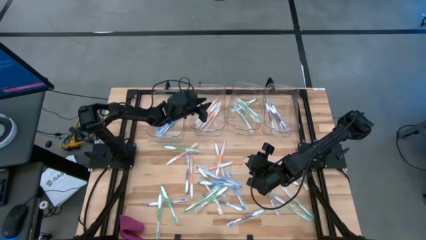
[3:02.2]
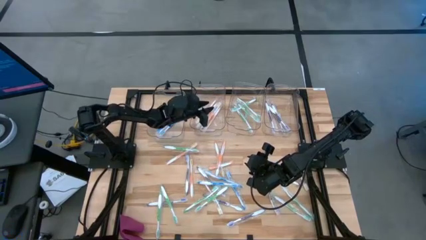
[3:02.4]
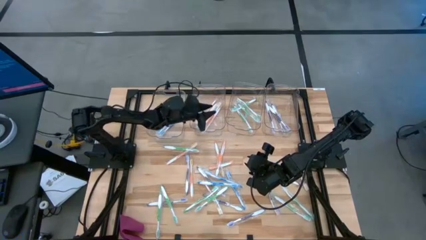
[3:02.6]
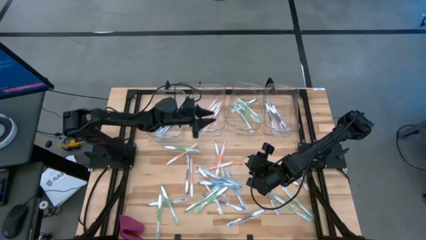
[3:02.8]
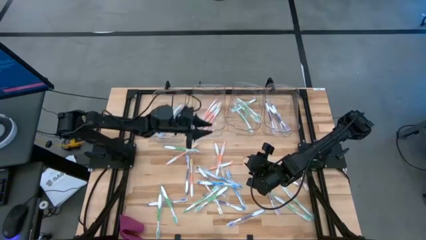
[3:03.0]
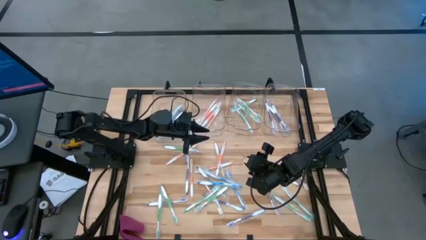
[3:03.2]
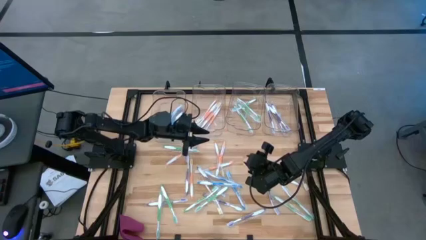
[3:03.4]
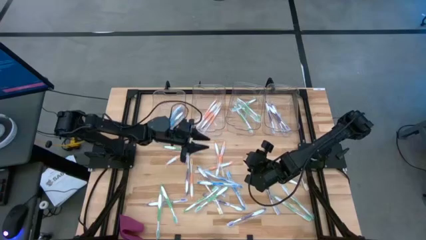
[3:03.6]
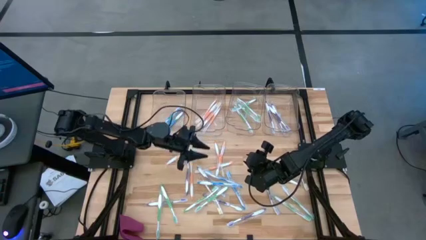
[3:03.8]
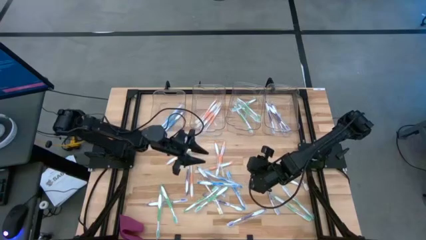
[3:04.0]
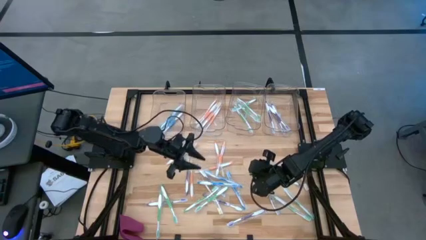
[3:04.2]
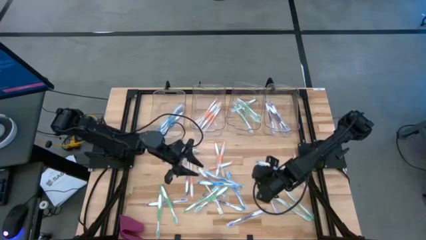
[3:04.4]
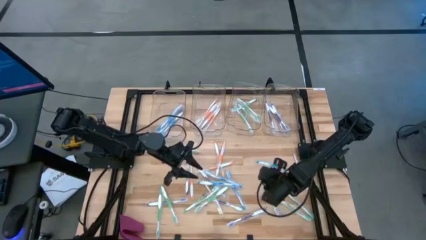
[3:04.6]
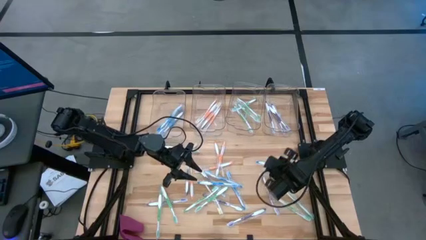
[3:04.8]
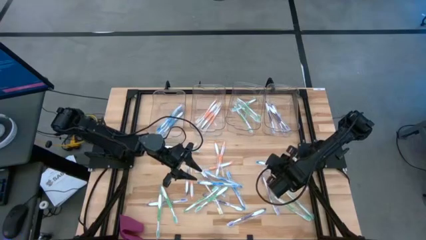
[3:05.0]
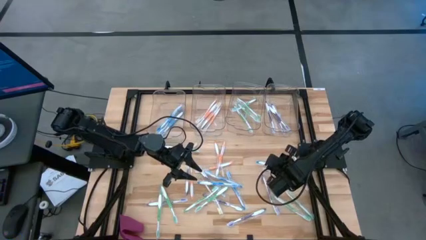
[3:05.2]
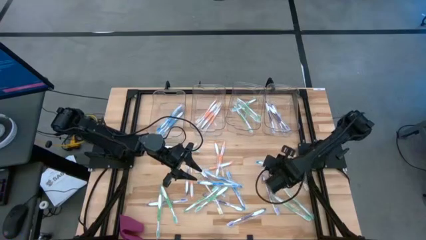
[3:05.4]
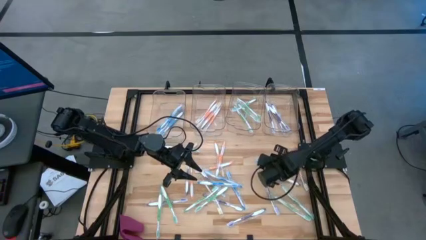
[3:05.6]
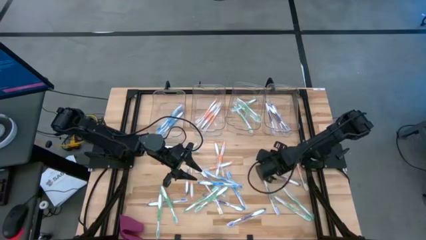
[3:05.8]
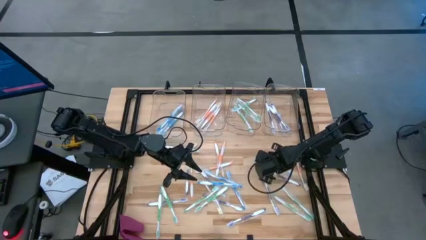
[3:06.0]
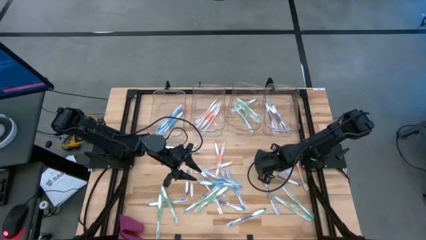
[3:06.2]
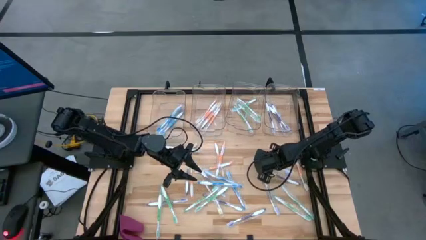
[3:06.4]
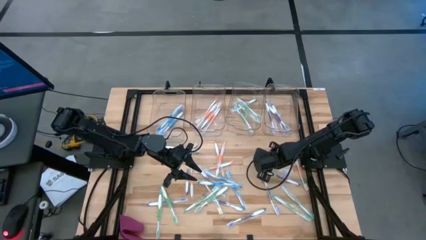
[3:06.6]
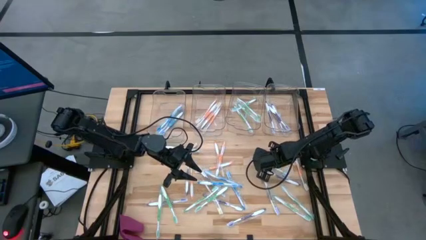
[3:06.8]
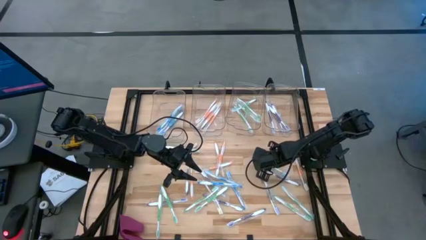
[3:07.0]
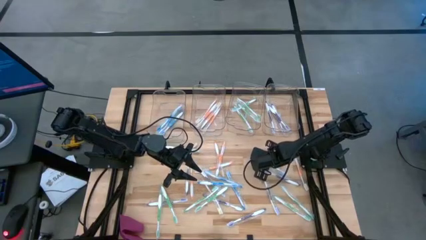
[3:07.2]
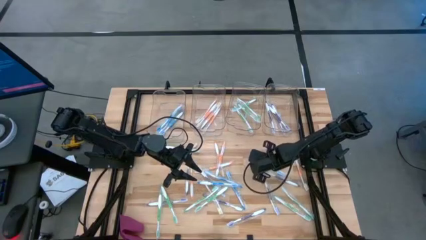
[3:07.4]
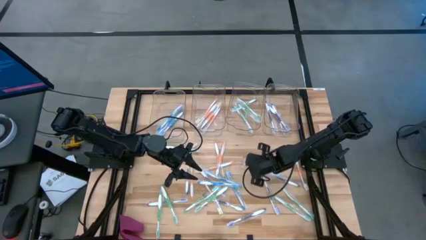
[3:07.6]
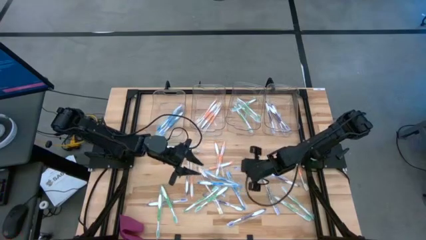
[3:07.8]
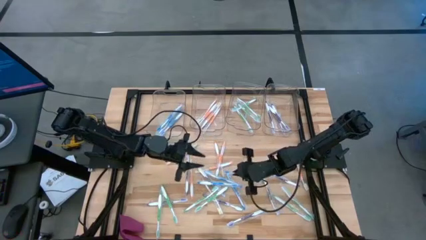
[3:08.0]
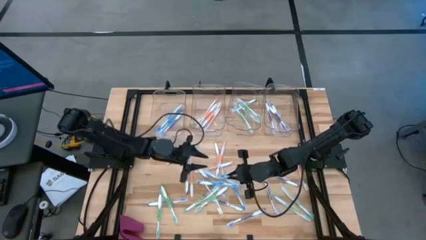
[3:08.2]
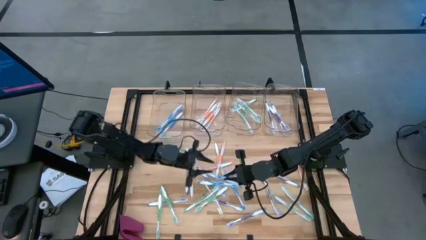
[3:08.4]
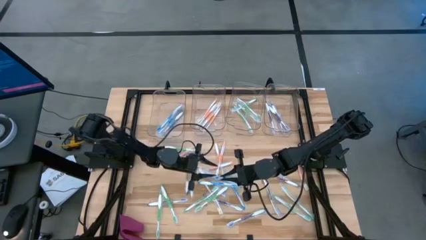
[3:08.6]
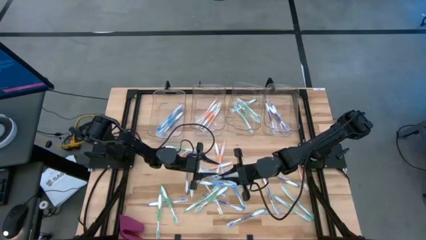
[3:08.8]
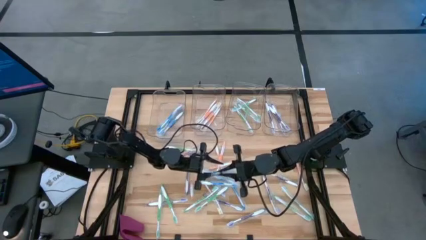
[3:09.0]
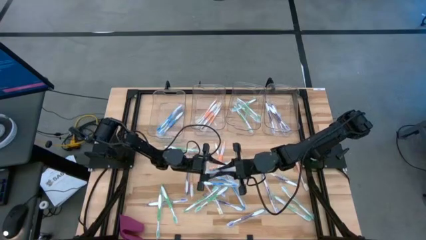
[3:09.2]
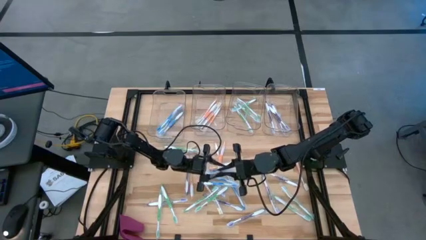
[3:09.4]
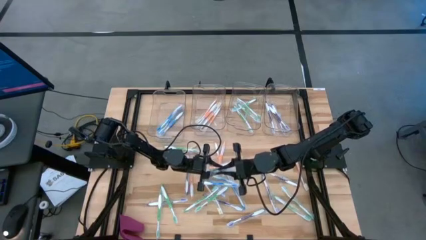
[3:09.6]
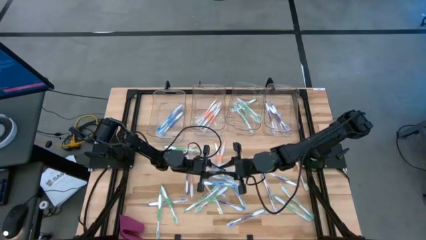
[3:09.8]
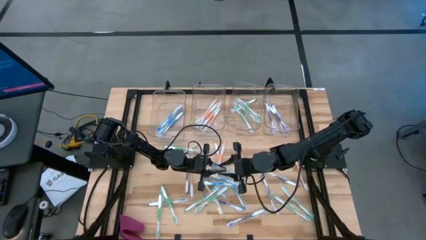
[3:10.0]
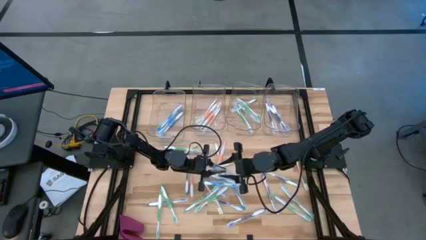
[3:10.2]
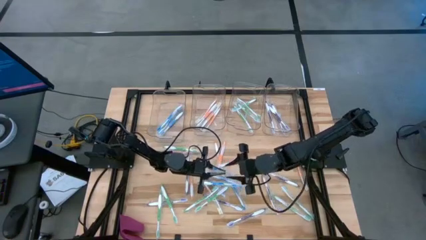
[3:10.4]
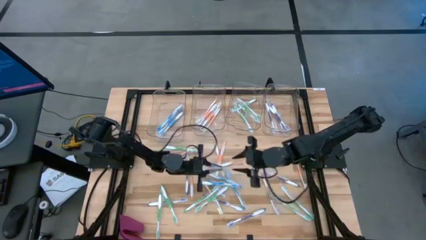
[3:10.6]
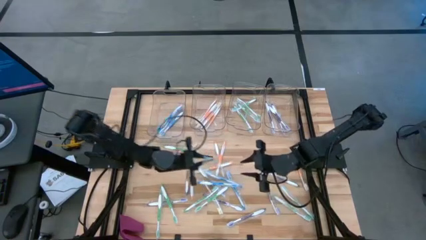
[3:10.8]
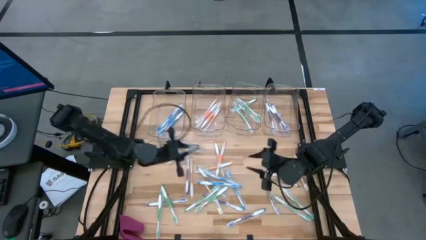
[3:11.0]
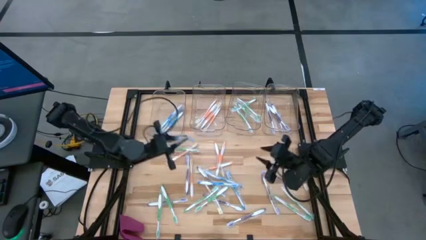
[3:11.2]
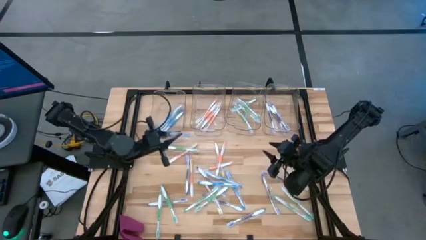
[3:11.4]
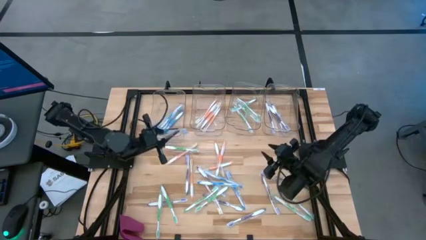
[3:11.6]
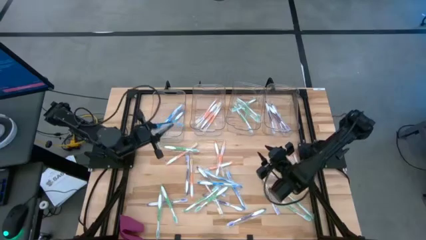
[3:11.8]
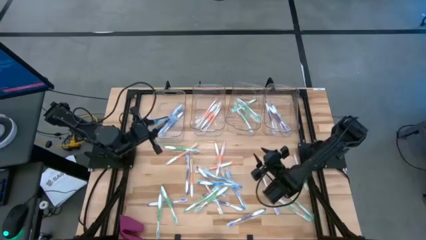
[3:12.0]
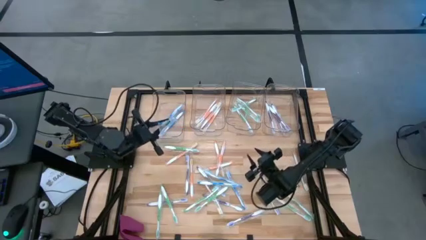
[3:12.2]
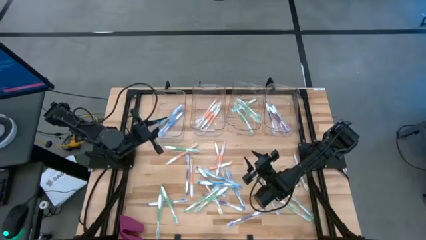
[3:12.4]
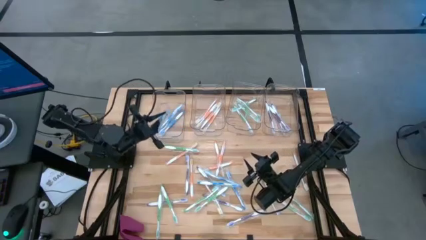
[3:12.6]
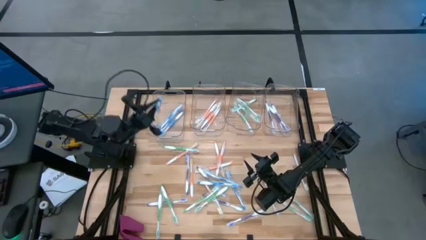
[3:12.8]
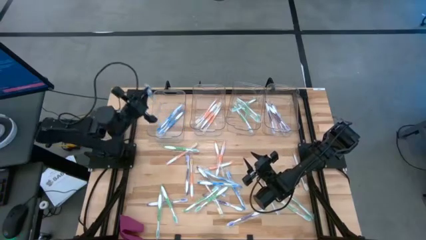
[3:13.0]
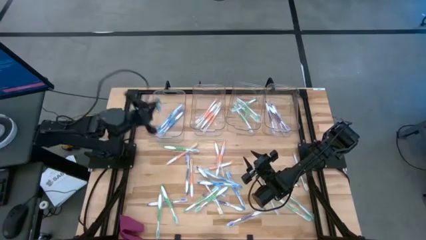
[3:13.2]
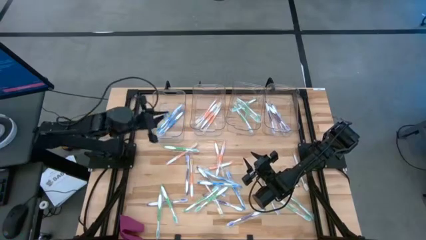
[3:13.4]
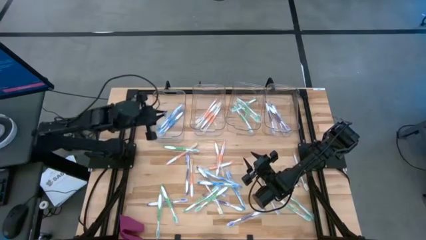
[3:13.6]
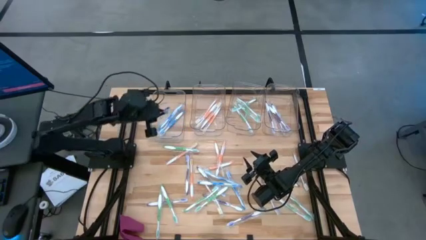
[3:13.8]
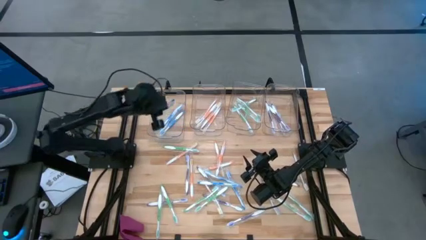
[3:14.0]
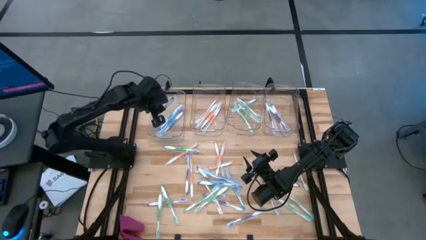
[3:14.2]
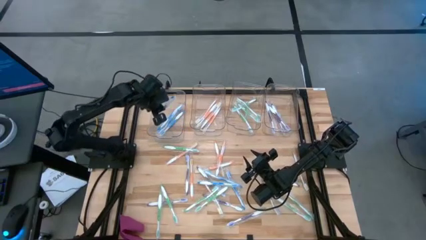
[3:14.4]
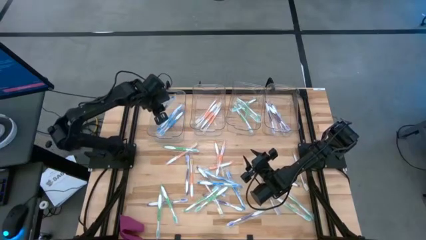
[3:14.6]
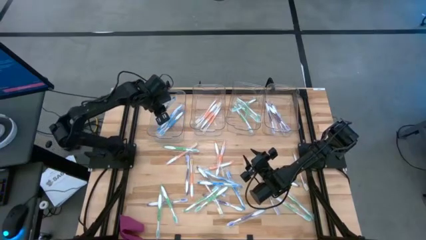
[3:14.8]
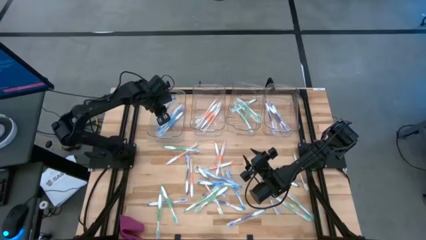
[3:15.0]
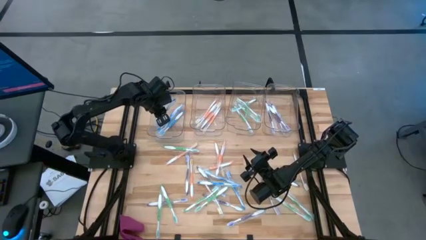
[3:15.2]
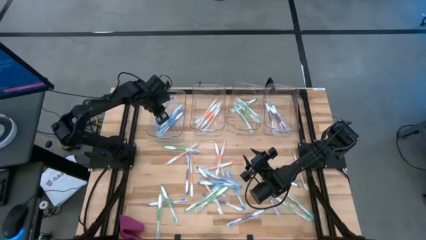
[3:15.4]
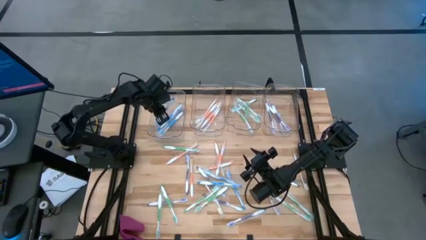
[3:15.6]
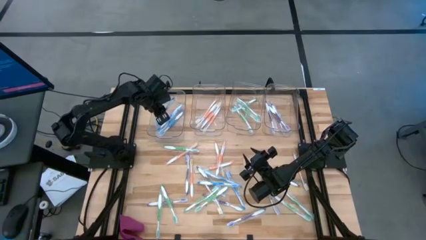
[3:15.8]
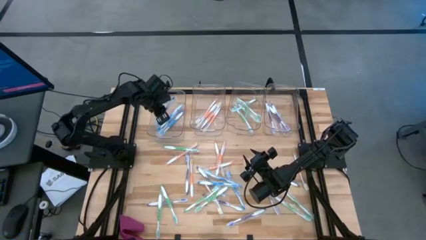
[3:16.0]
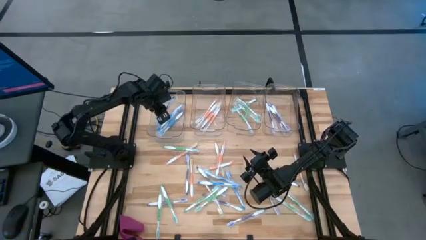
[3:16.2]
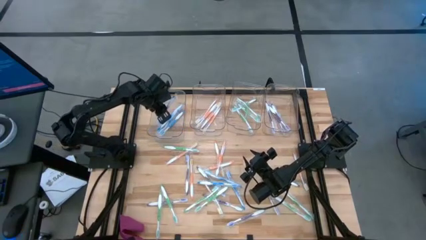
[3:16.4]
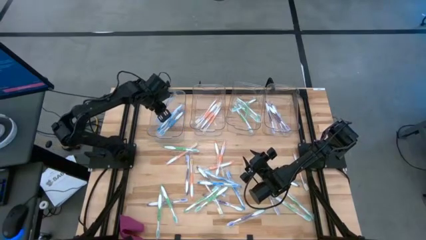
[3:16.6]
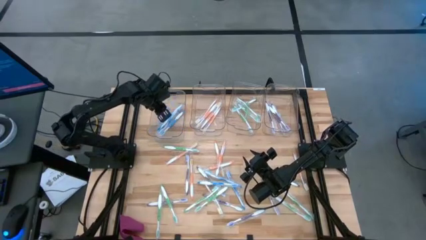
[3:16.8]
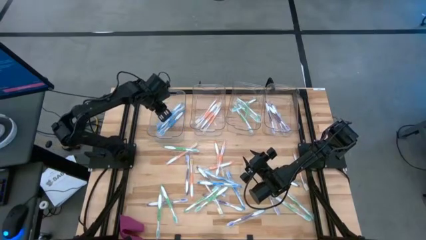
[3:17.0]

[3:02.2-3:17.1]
Task: Pick & Place Toothbrushes
Put the blue toothbrush into the left transparent bin

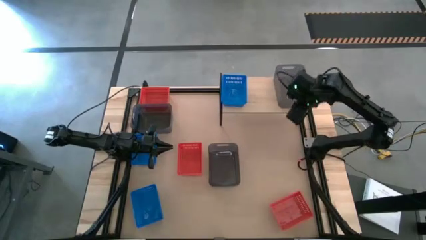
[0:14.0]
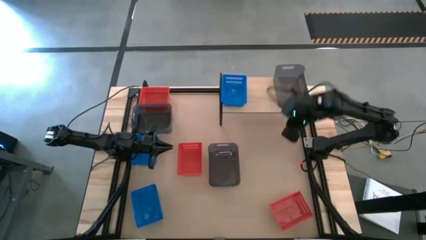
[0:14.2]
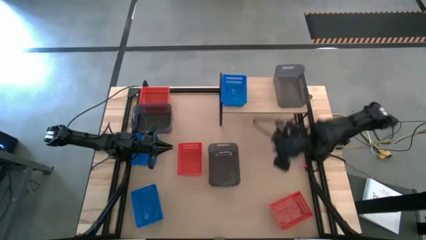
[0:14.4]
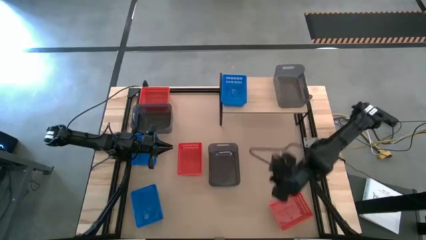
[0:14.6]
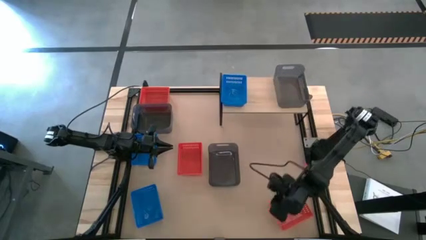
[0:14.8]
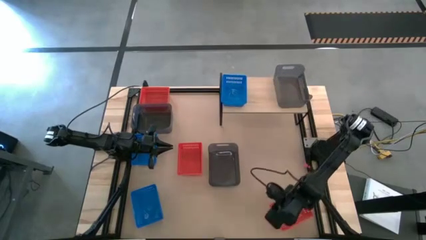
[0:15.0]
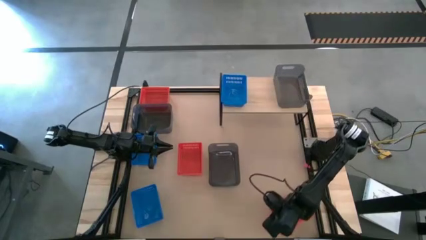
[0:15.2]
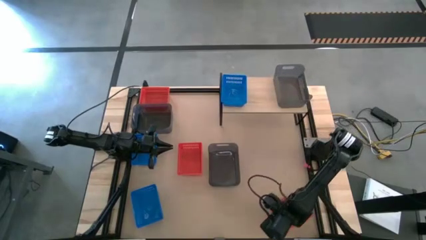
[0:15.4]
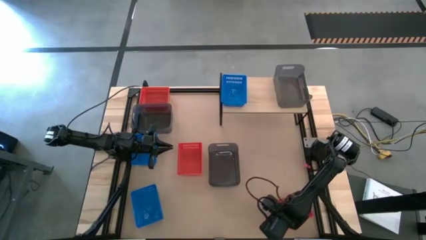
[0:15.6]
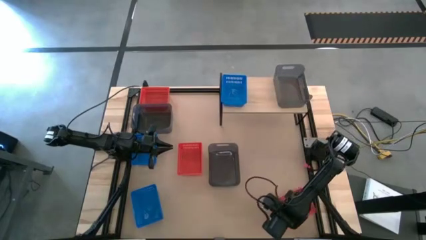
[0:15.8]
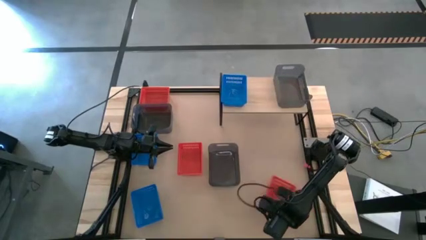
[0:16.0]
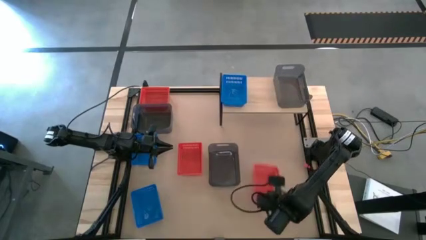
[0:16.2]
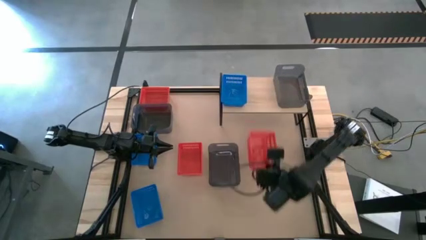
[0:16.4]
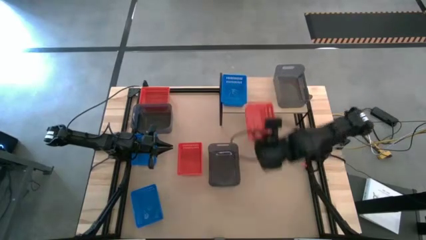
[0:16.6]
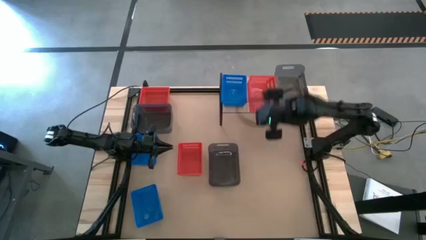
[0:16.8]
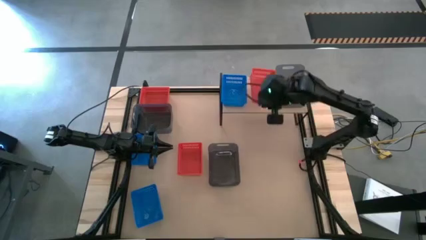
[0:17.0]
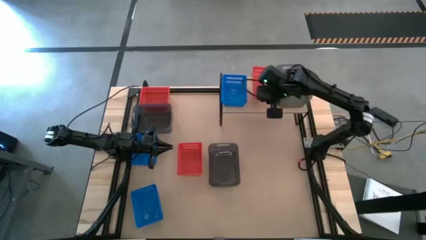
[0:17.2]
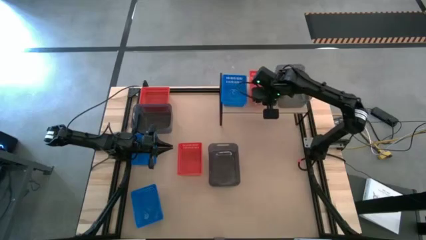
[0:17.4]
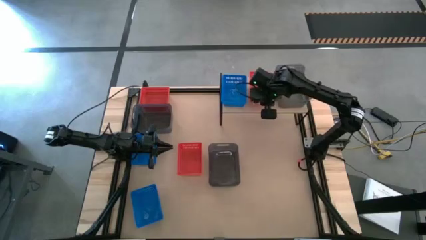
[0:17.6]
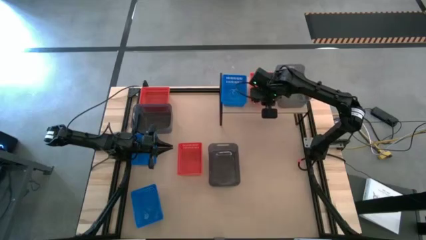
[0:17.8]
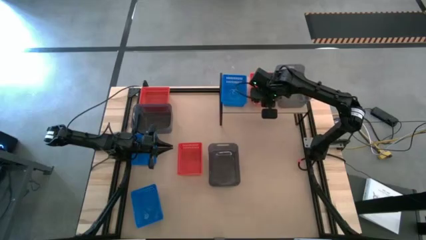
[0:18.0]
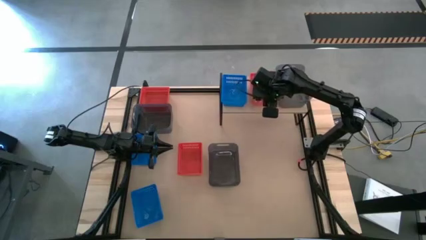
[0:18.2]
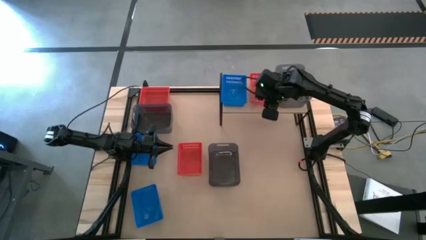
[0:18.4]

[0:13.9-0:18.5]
Task: Stack baskets on shelf by color
Put the bottom red bin on the shelf
